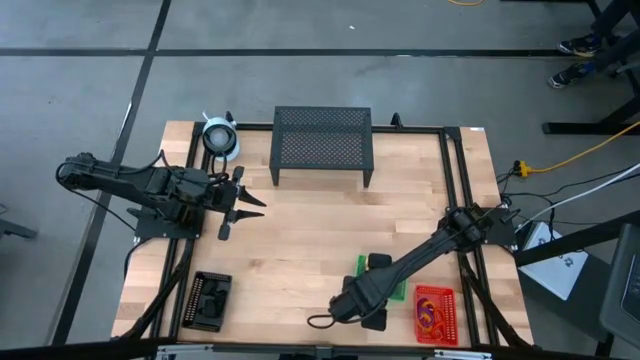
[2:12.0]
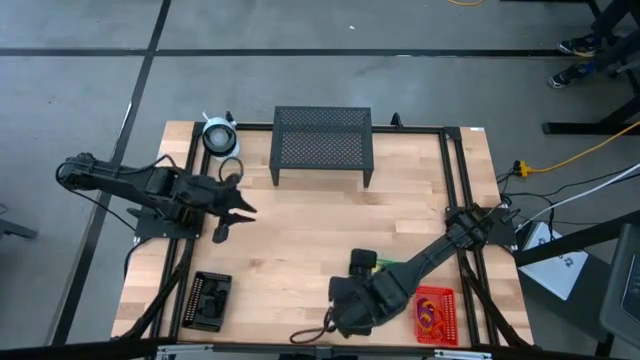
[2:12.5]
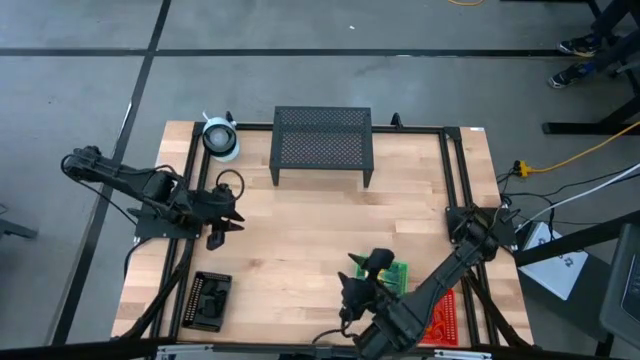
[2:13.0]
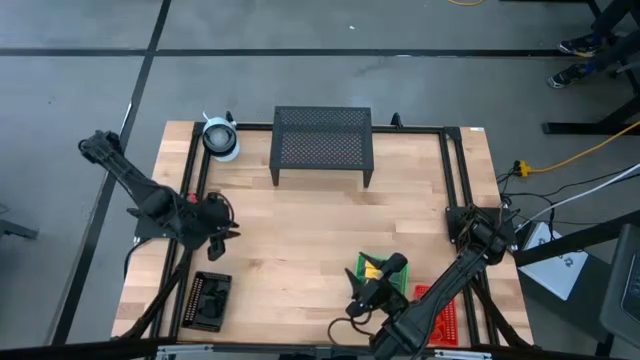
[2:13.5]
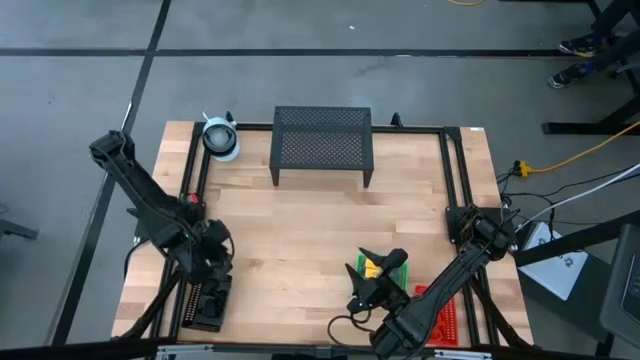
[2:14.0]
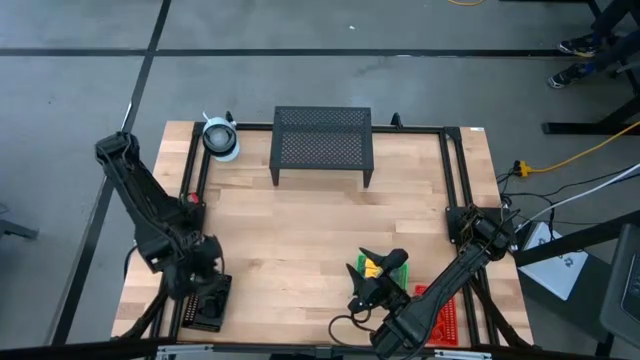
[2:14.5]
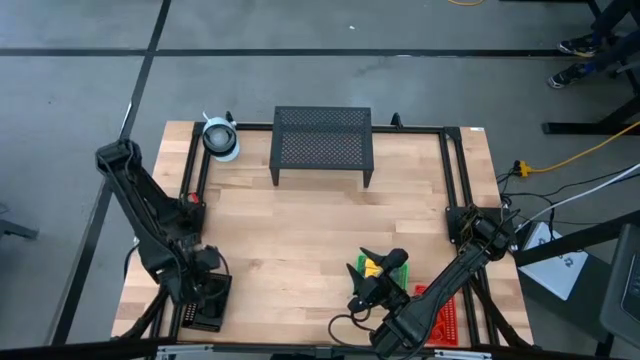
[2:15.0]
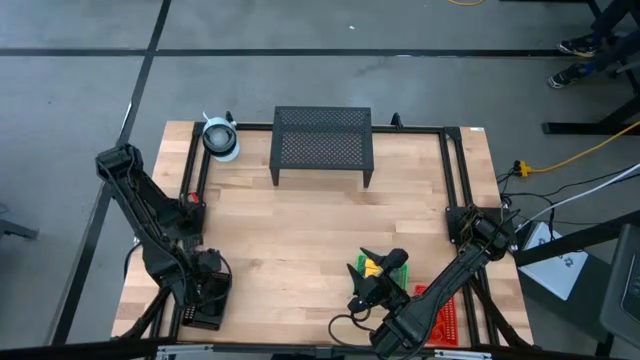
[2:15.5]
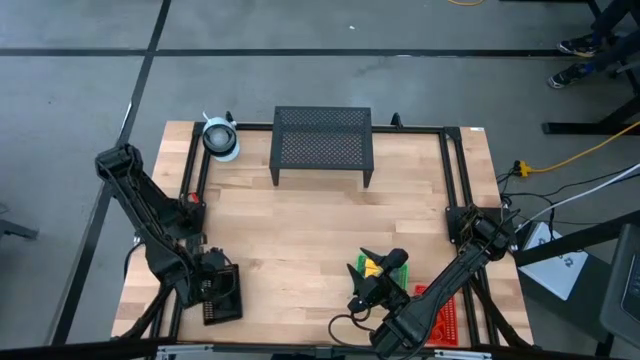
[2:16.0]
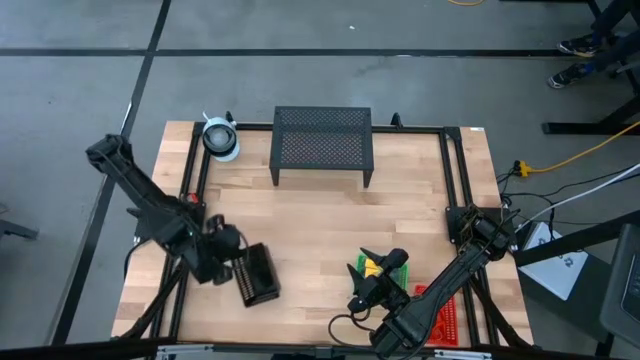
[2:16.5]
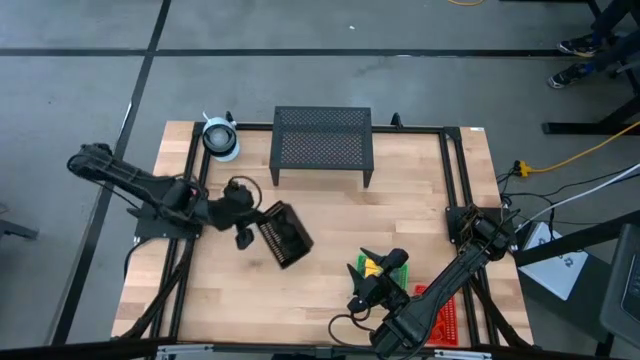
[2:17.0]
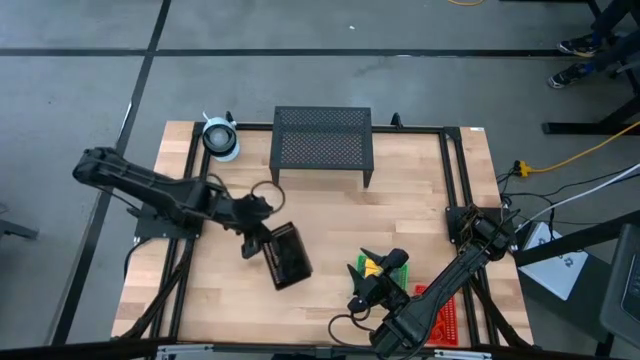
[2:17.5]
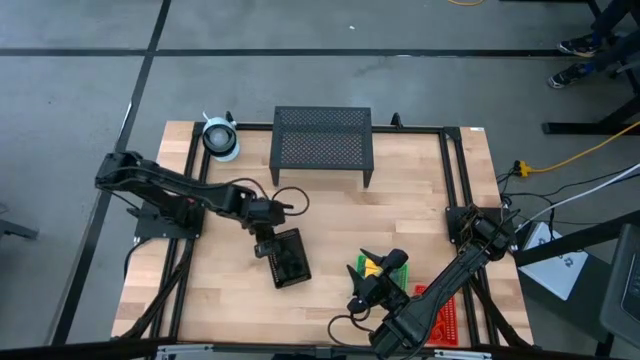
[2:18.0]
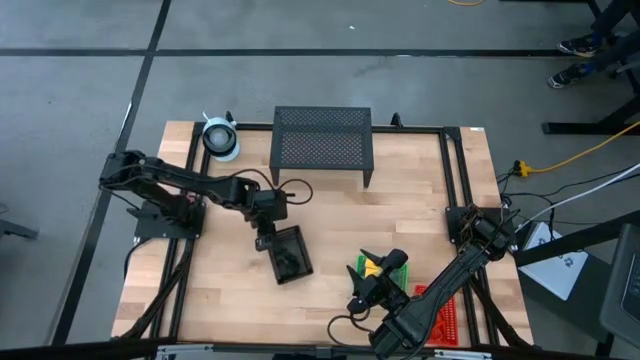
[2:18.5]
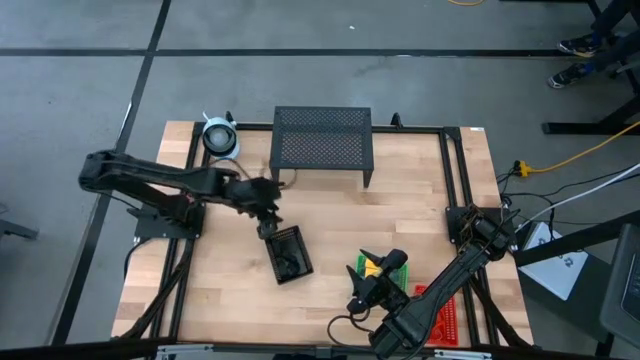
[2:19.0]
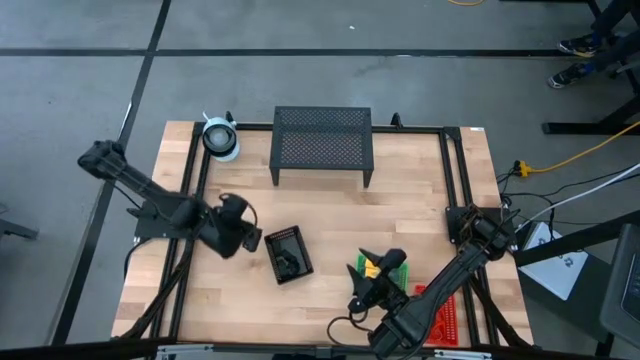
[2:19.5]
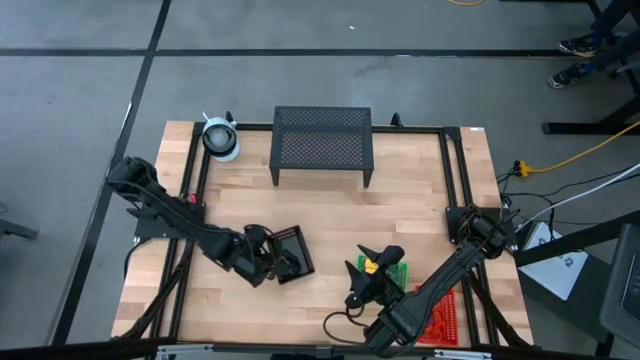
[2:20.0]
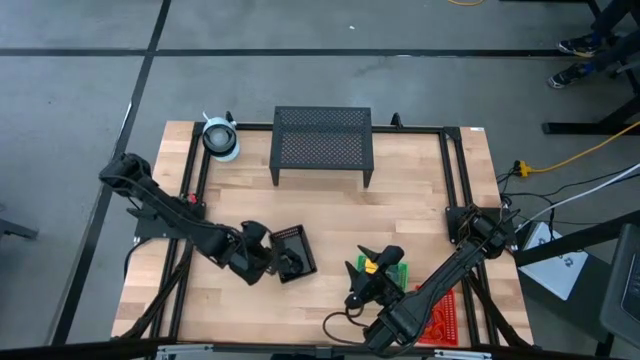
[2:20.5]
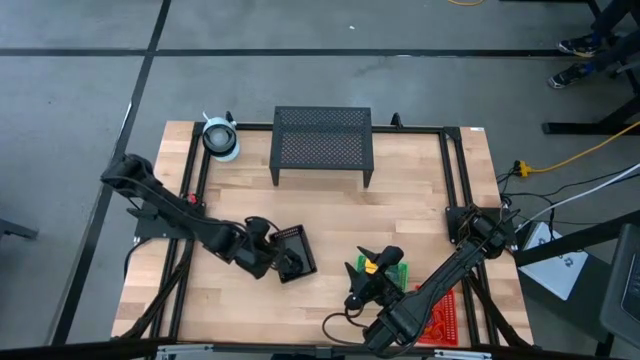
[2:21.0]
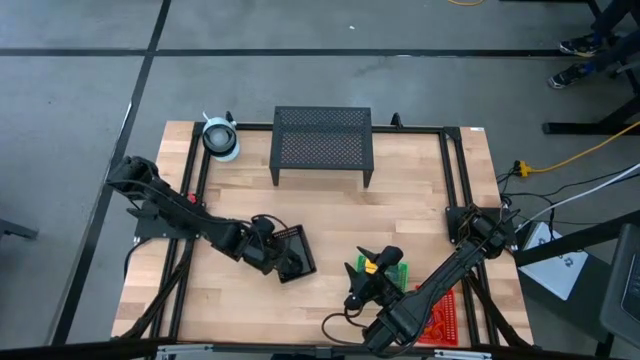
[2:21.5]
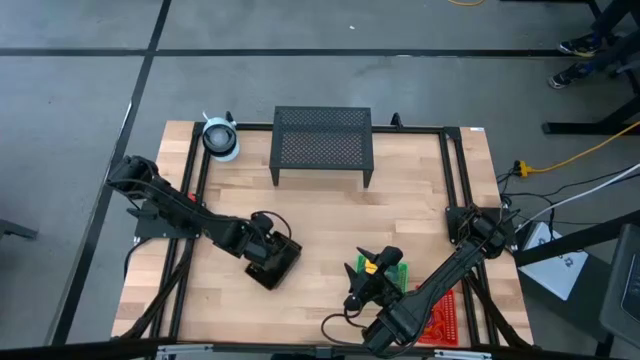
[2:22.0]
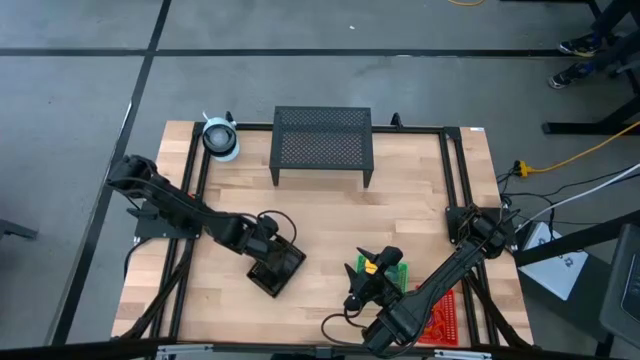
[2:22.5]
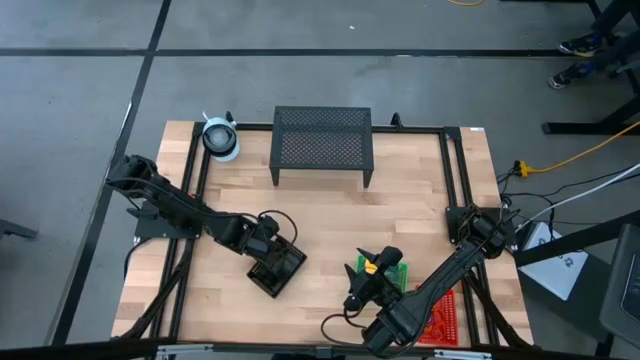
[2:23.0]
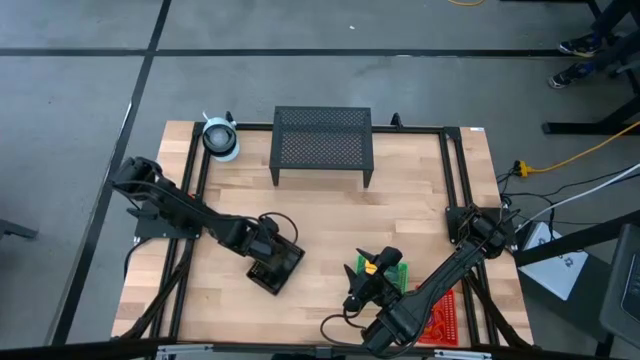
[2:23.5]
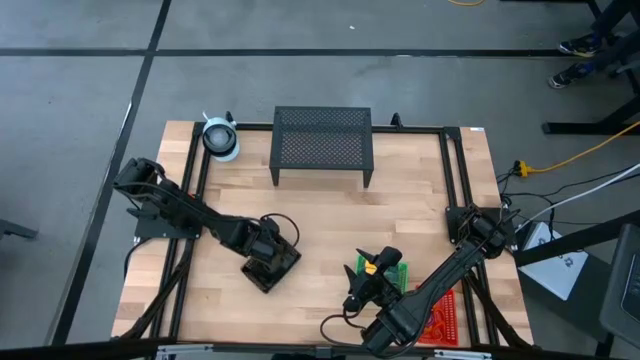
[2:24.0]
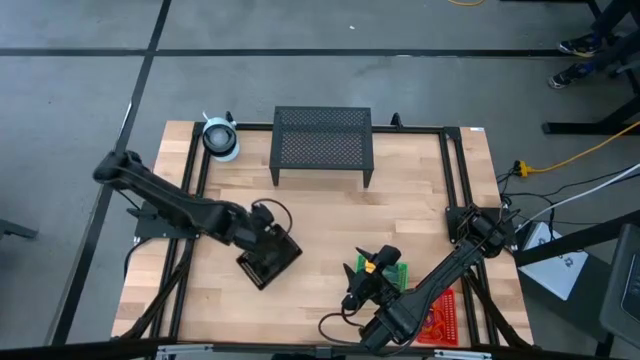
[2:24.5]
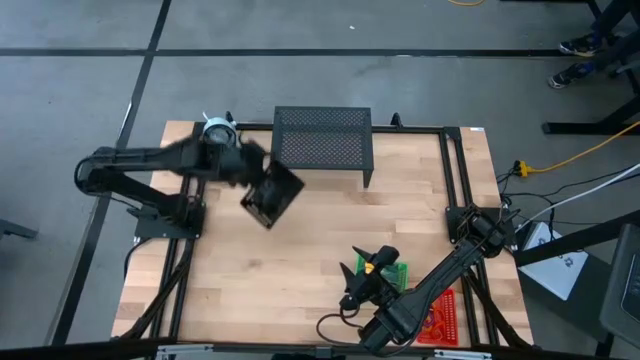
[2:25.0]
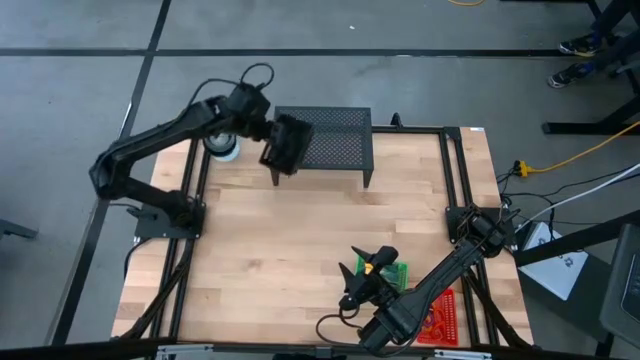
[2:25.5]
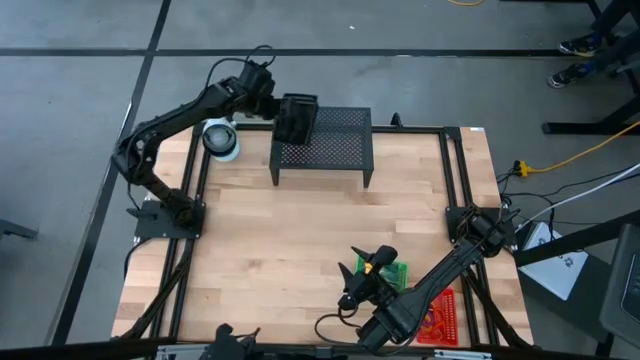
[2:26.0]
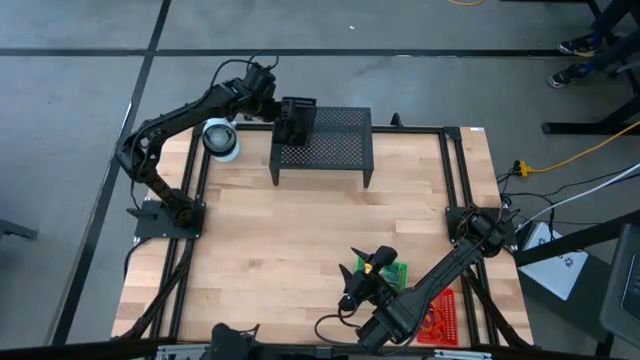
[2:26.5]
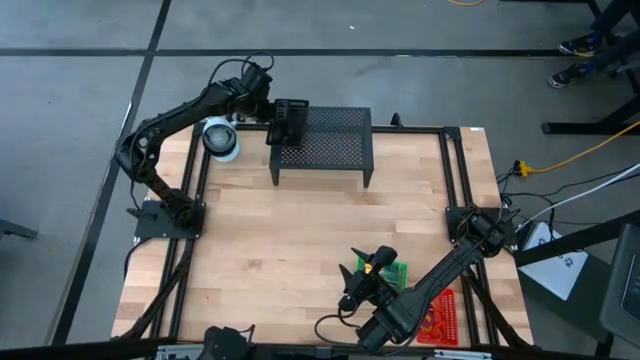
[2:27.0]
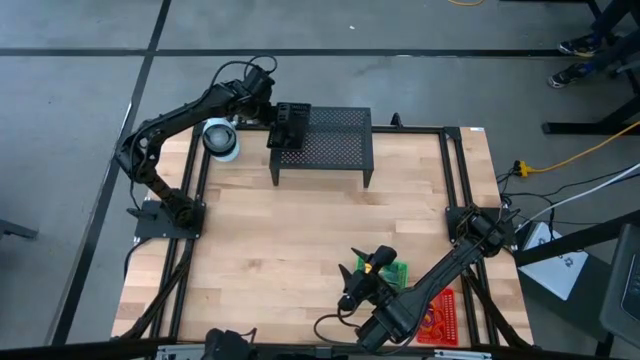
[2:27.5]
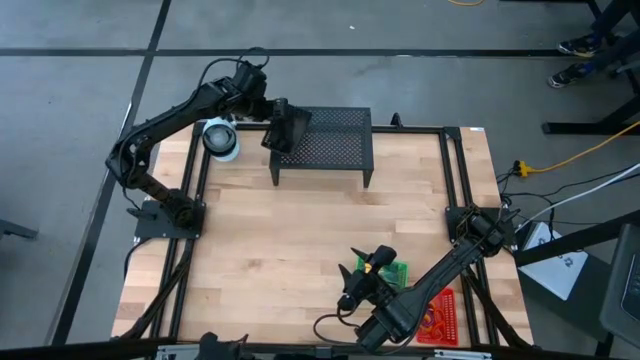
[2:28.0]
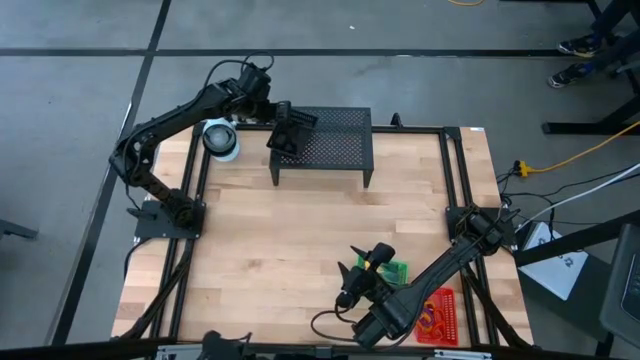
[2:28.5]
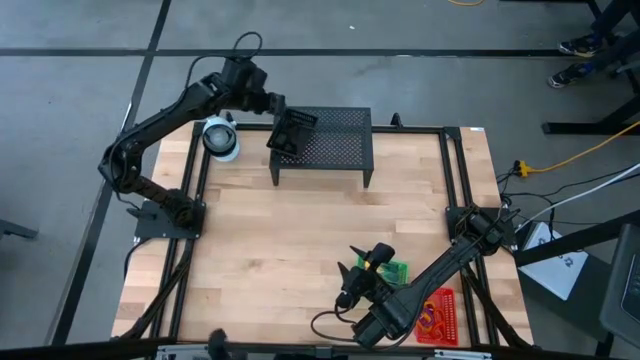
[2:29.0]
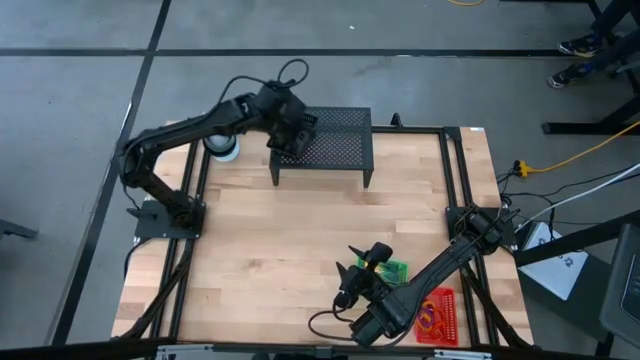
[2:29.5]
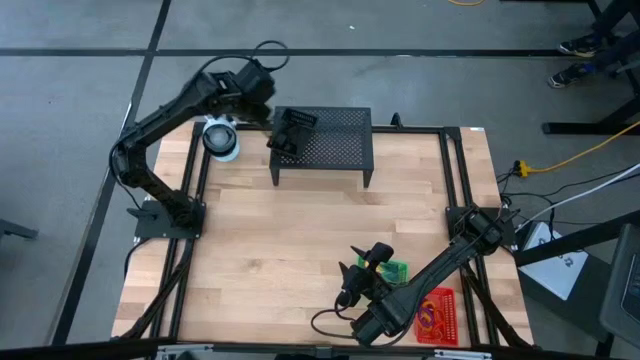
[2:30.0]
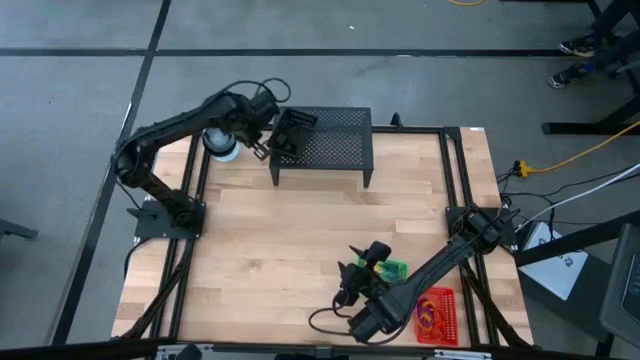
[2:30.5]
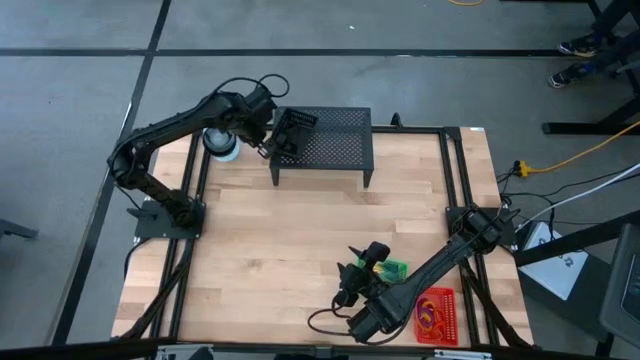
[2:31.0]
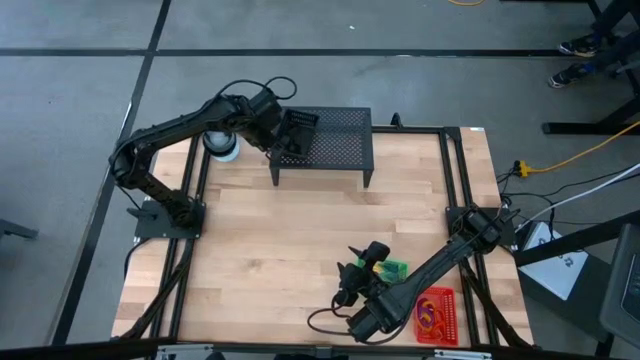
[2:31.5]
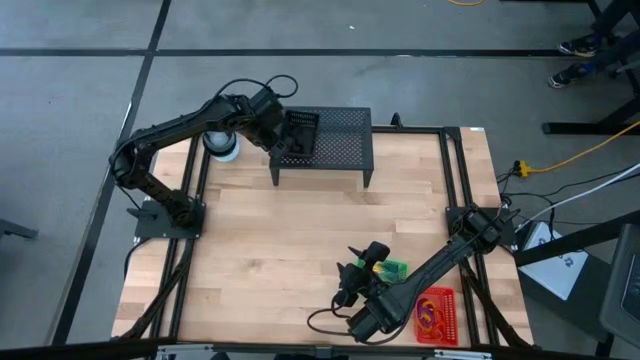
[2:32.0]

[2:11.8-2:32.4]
Task: Pick & Place Office Desk Supplies
Put the black bin with rubber bands on the shelf
